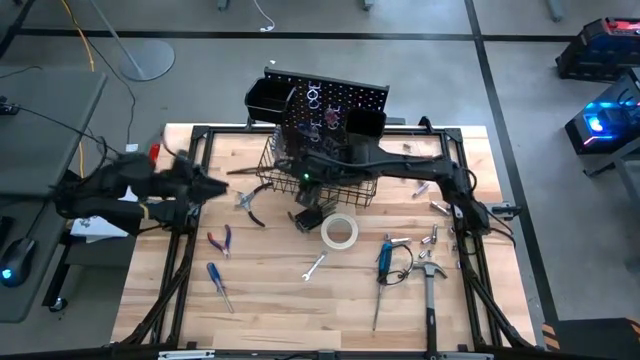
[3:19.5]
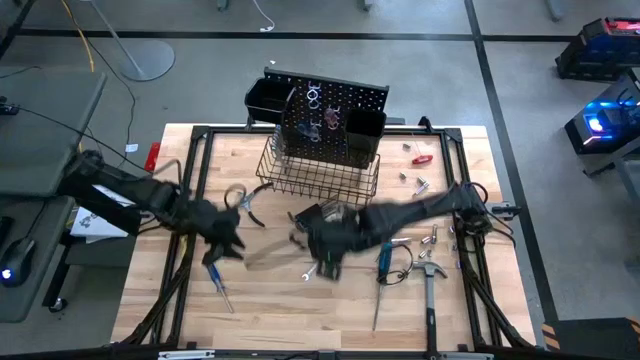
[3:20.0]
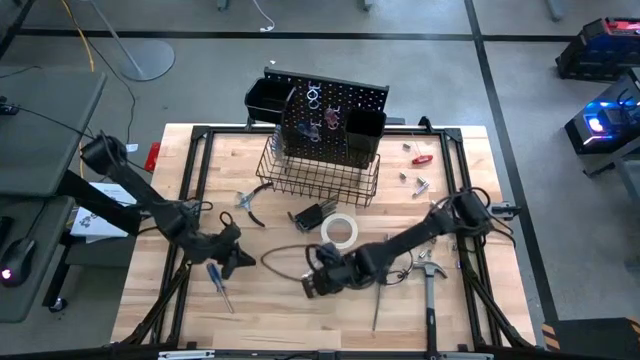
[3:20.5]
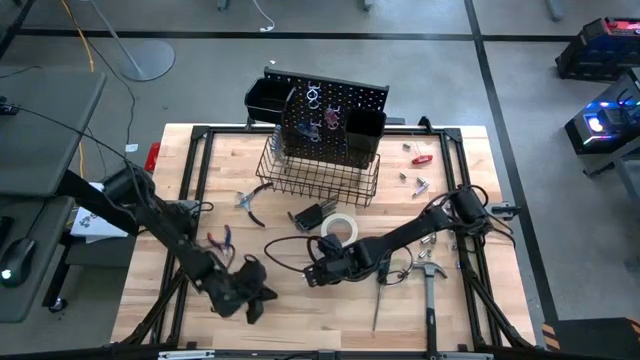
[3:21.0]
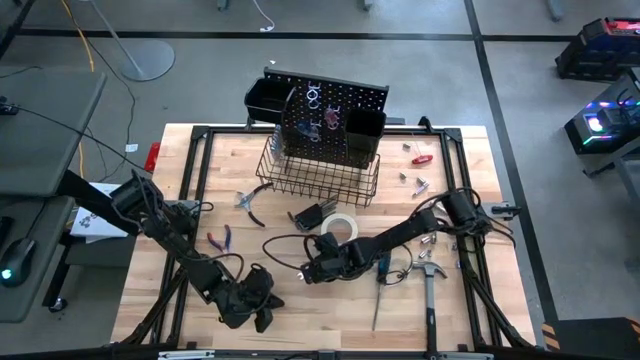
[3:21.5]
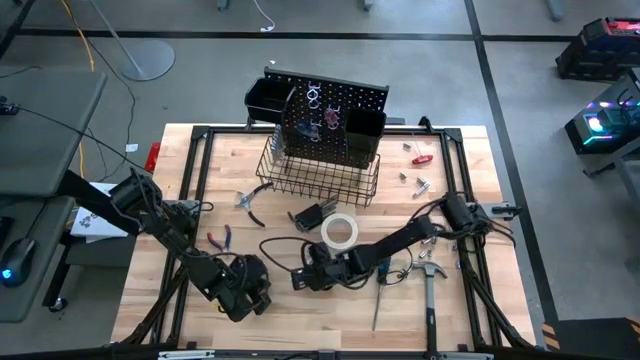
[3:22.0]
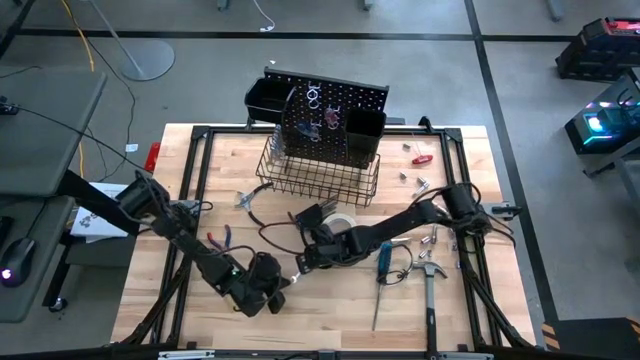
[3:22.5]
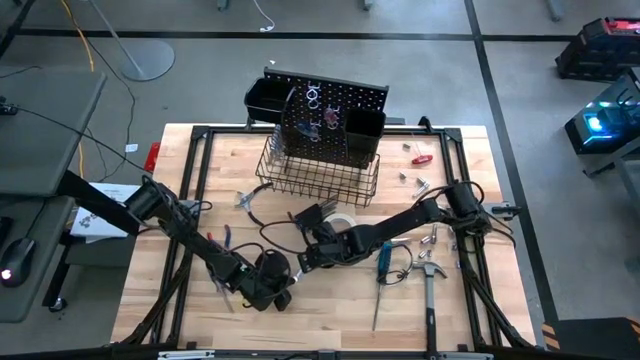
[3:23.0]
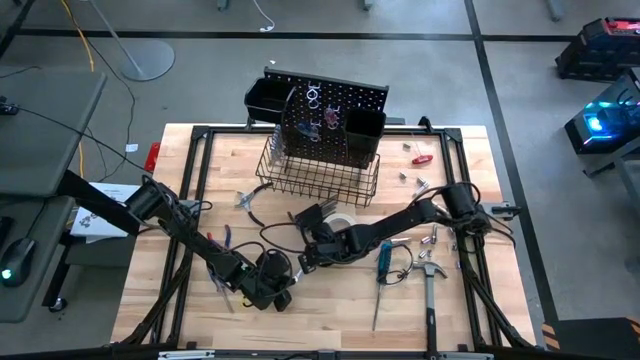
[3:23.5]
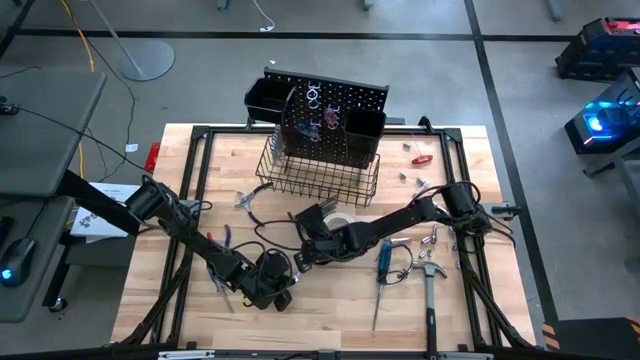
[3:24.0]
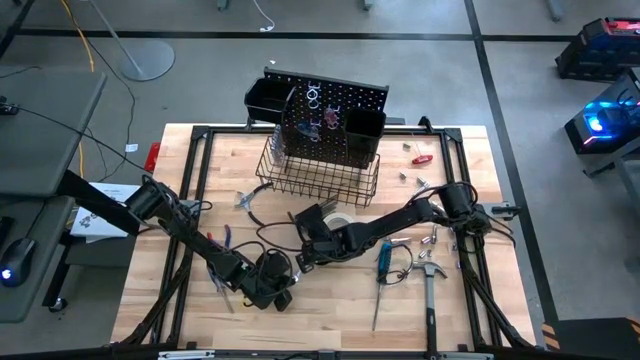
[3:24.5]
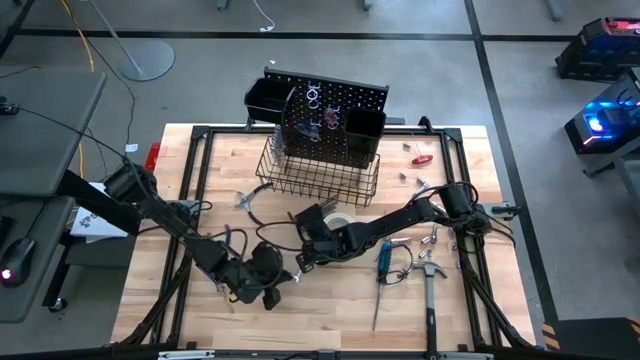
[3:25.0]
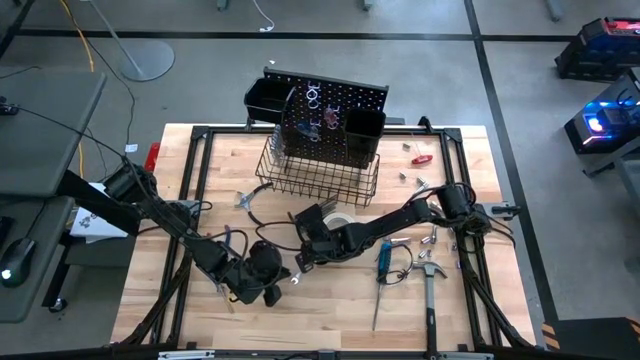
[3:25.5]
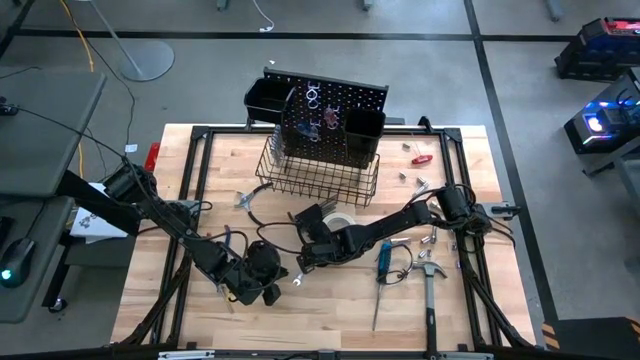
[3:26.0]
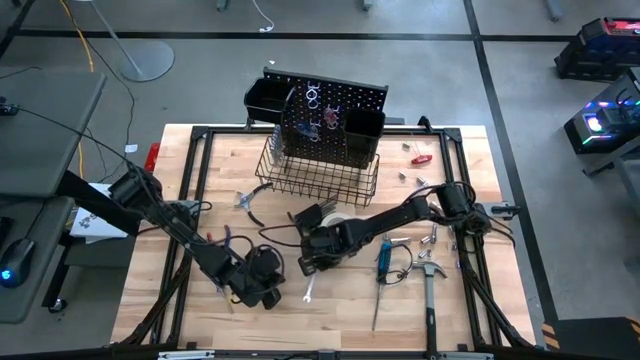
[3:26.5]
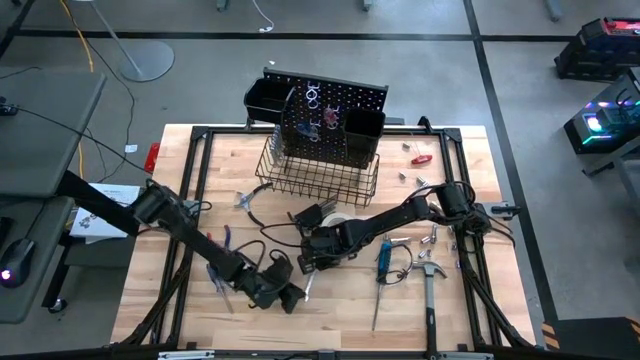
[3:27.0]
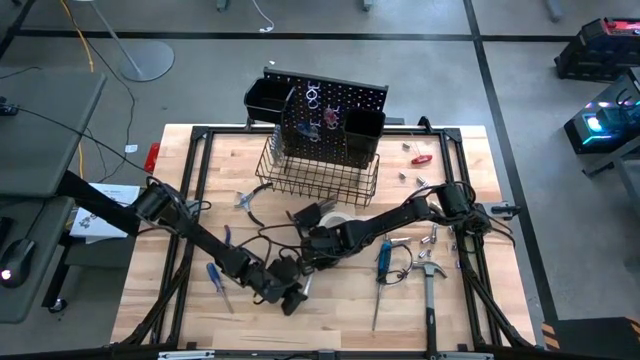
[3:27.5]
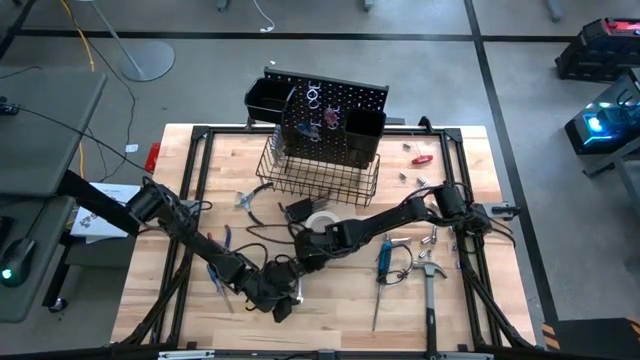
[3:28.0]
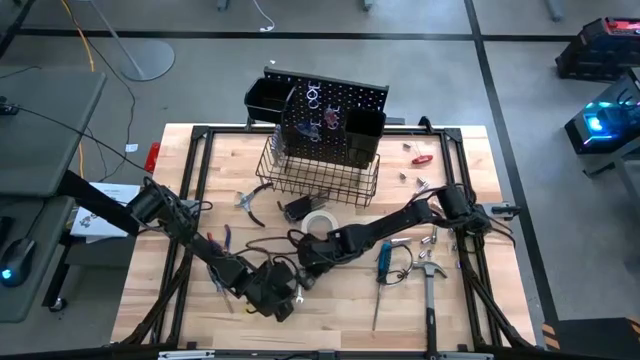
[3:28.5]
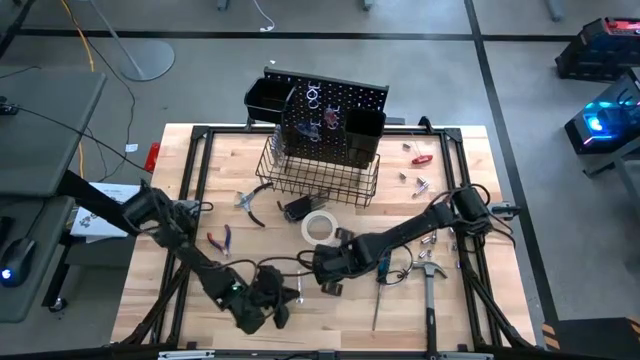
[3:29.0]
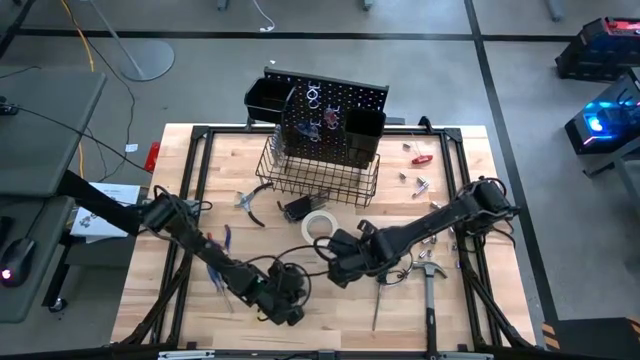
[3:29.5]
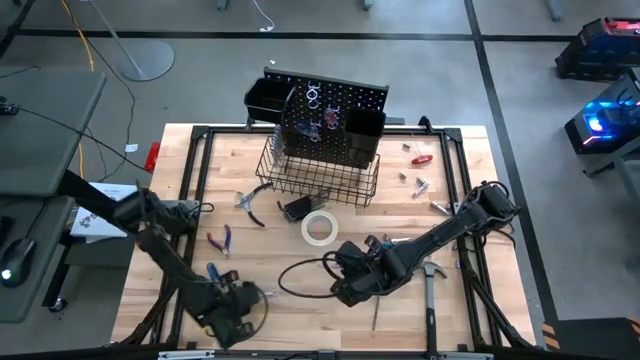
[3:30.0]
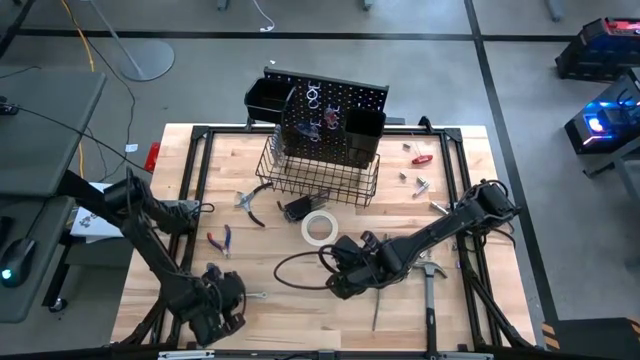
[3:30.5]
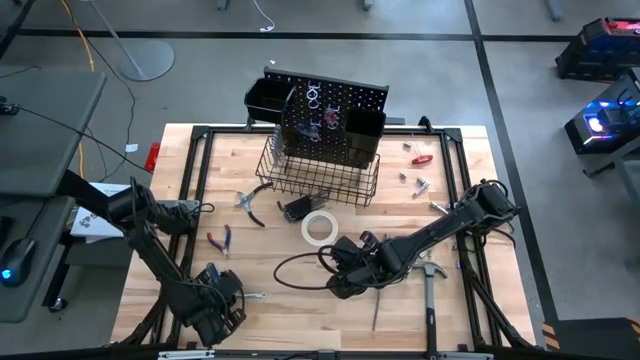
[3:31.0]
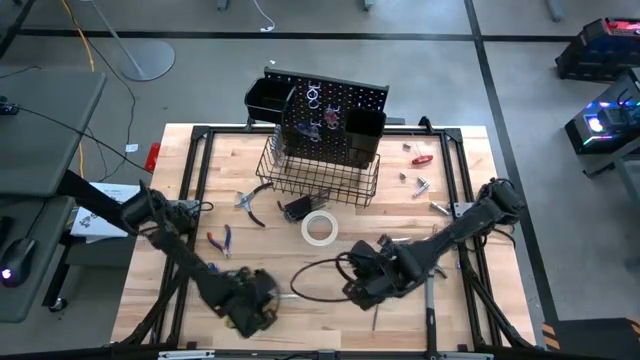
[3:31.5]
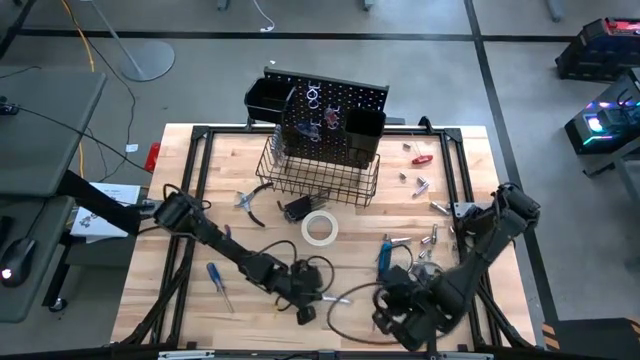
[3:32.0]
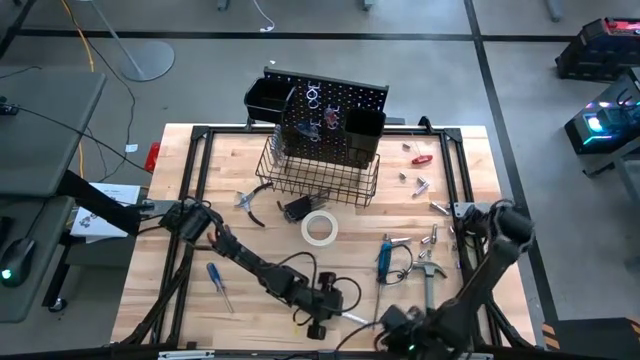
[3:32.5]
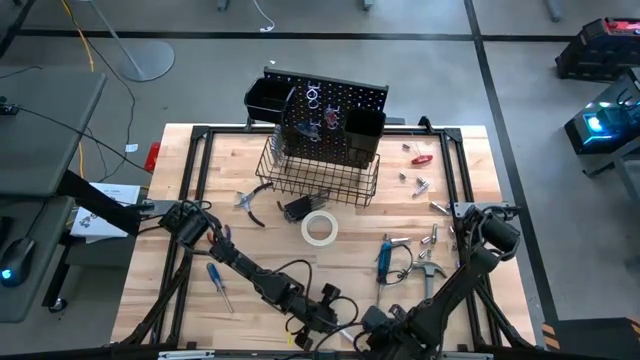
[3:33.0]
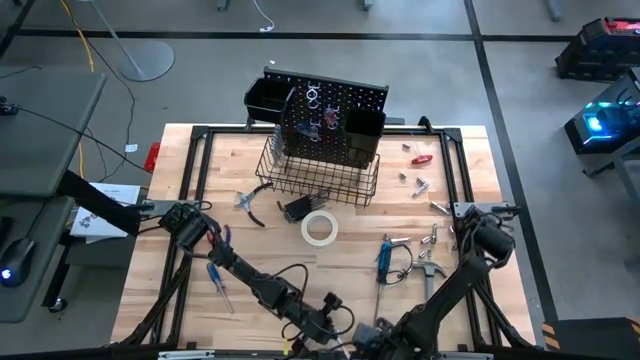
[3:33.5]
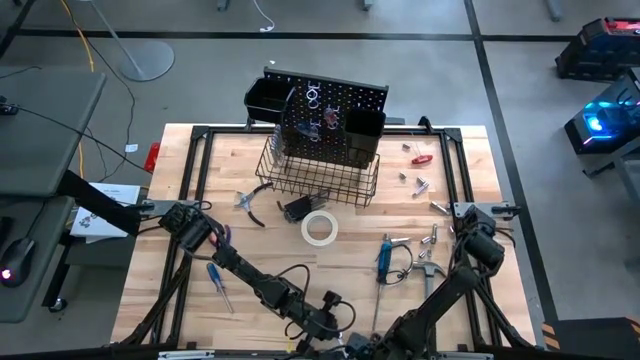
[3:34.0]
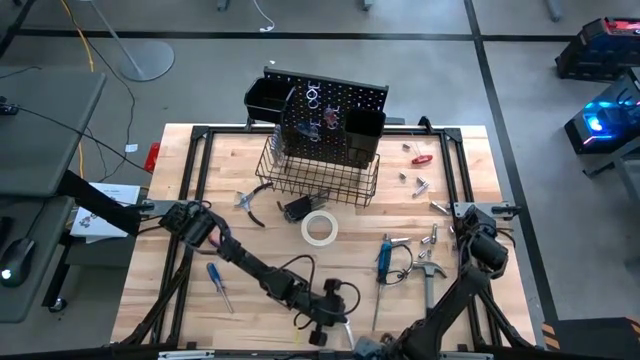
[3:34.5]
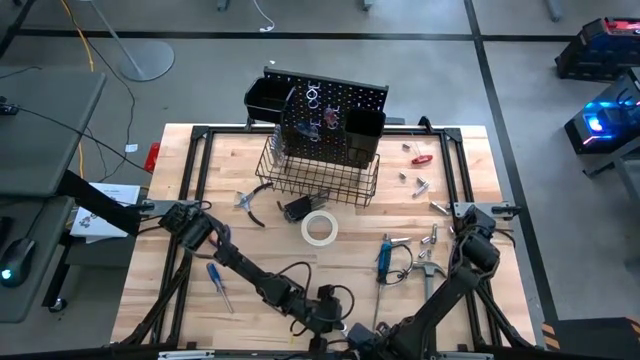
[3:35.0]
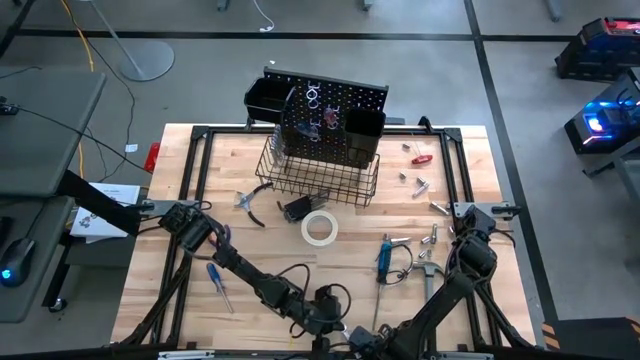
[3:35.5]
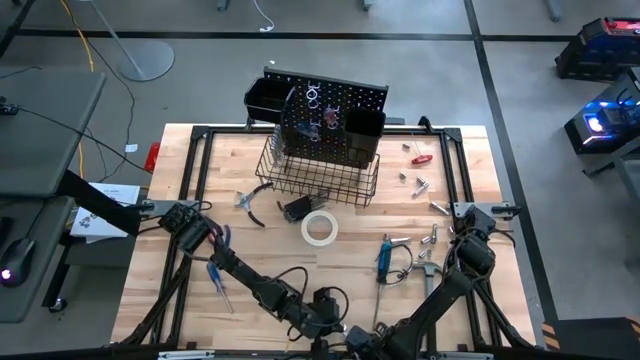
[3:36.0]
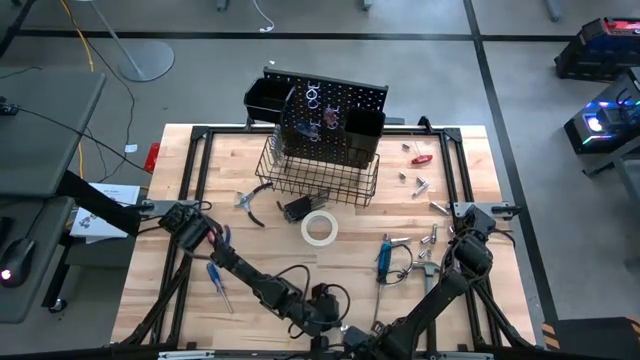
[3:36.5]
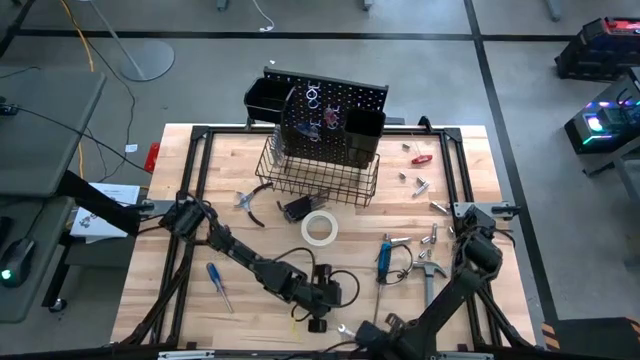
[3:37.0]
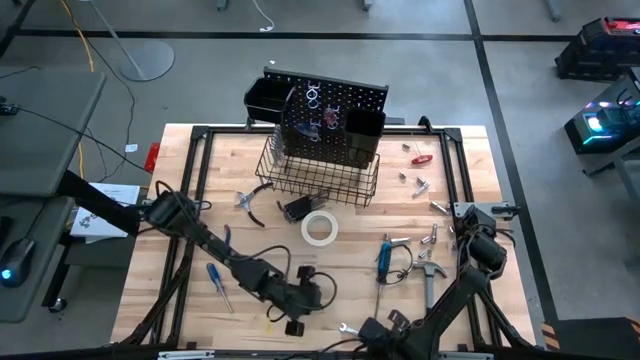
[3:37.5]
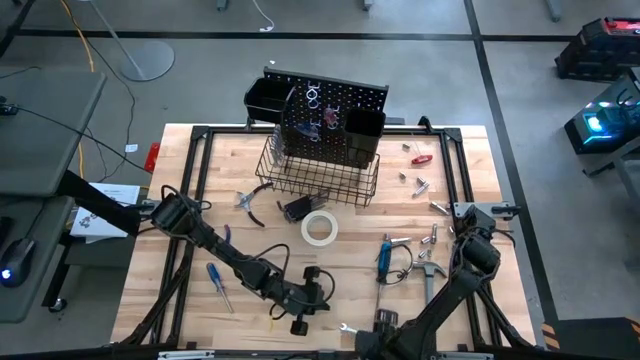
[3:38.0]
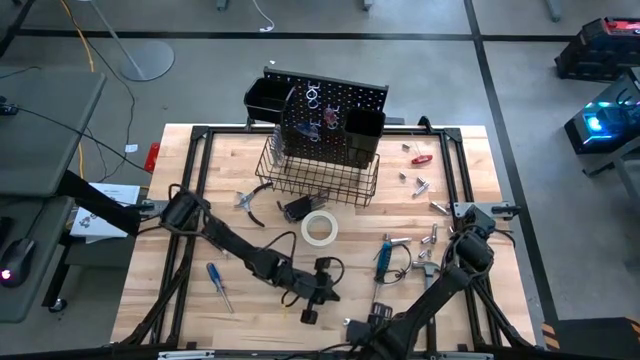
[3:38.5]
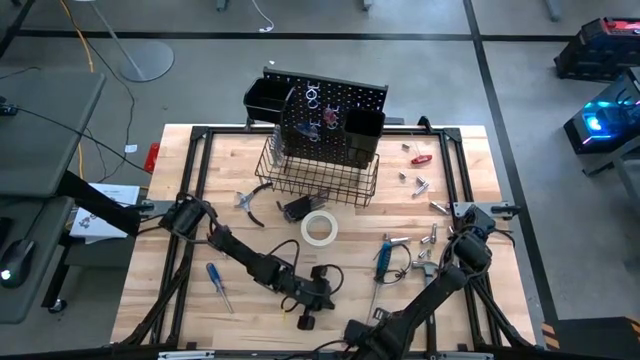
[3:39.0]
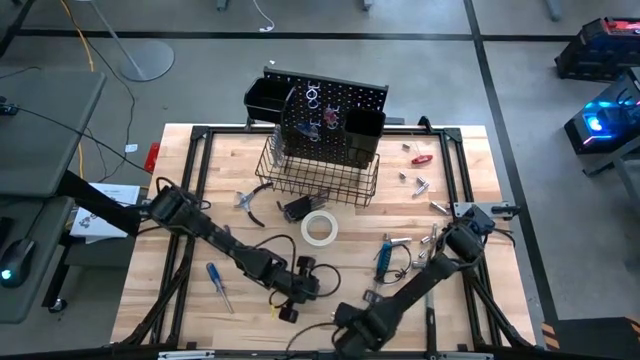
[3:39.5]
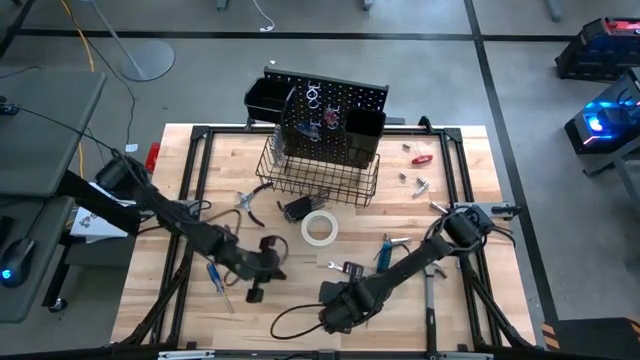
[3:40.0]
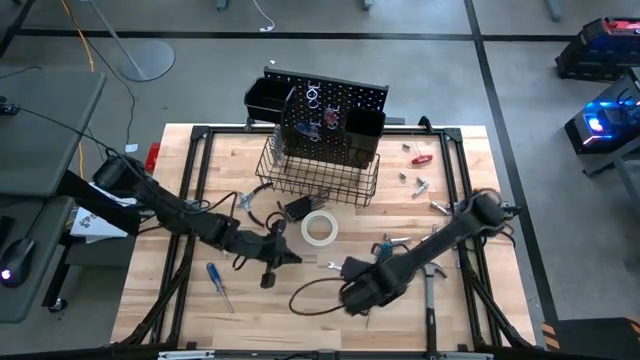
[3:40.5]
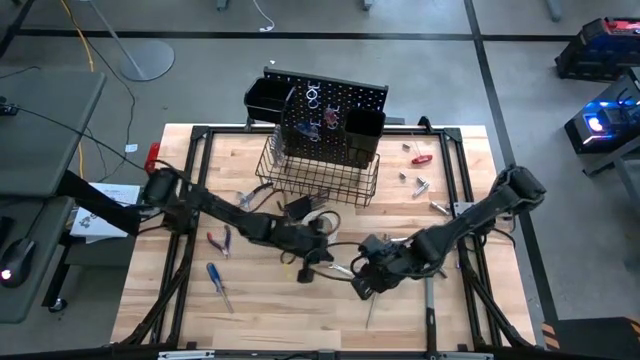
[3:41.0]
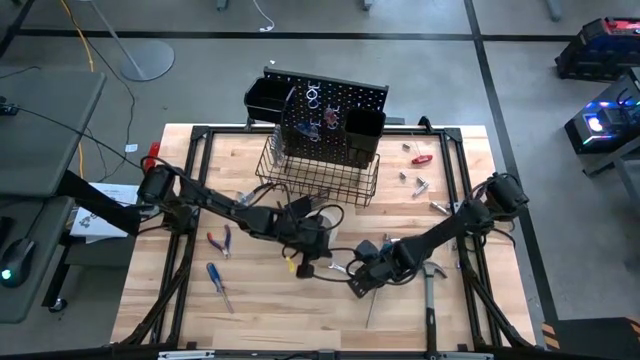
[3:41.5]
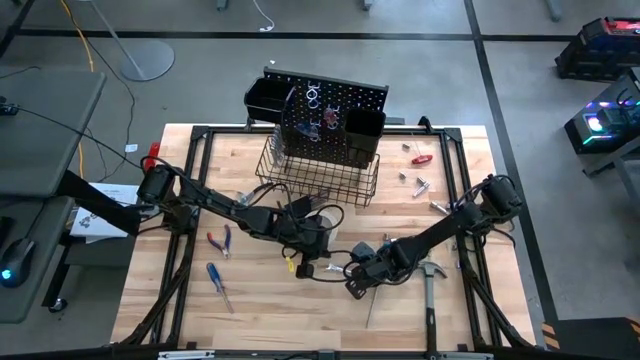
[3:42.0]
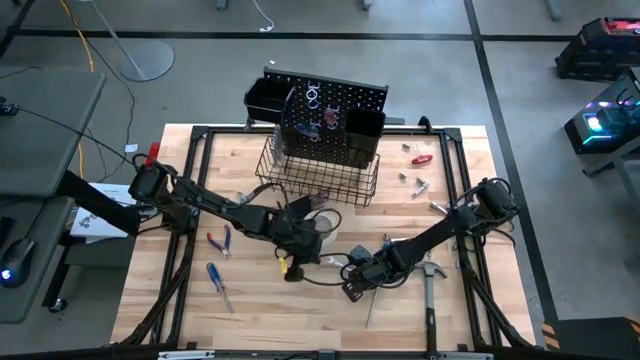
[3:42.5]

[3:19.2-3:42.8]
Task: Hang tools onto peg board
Hang the wrench on the peg board
